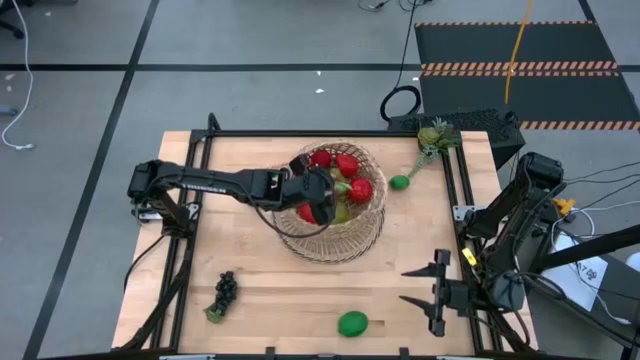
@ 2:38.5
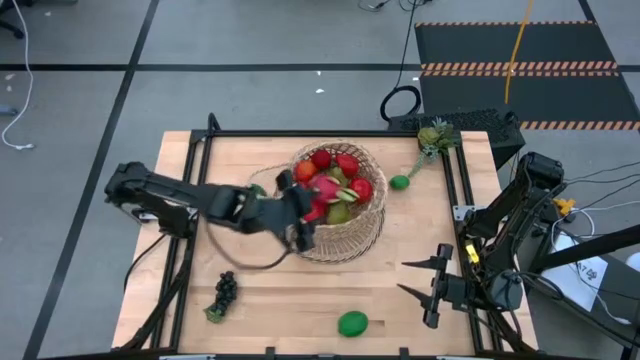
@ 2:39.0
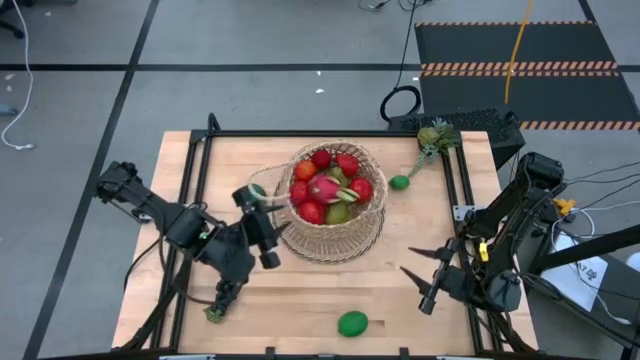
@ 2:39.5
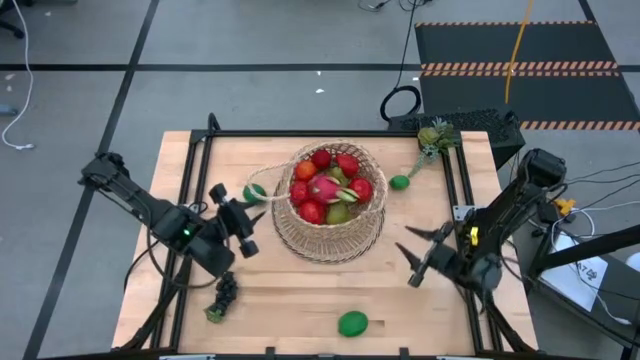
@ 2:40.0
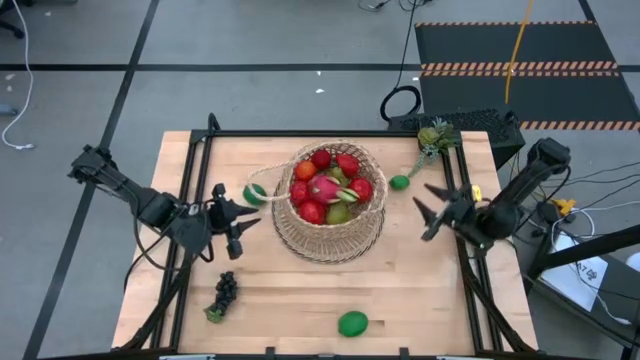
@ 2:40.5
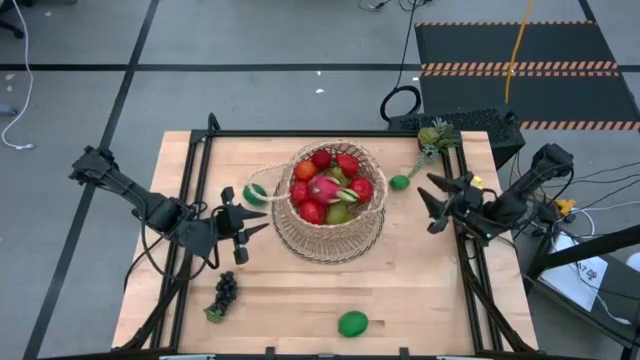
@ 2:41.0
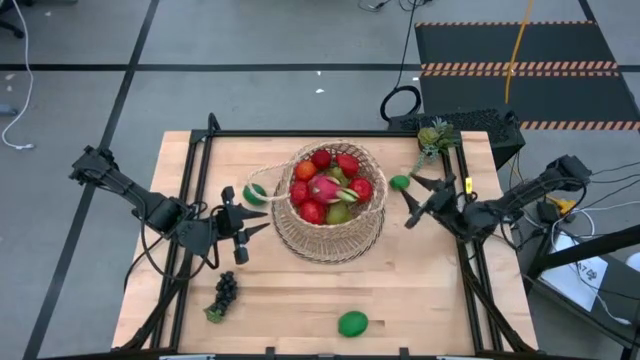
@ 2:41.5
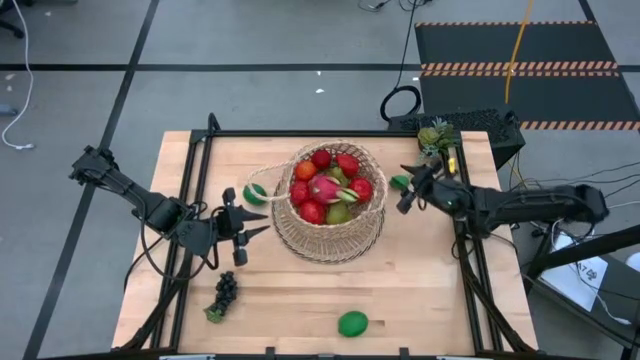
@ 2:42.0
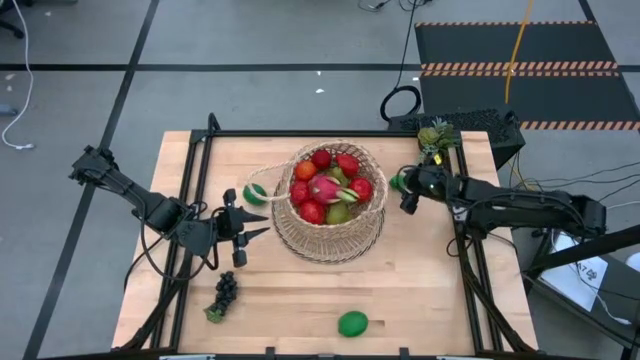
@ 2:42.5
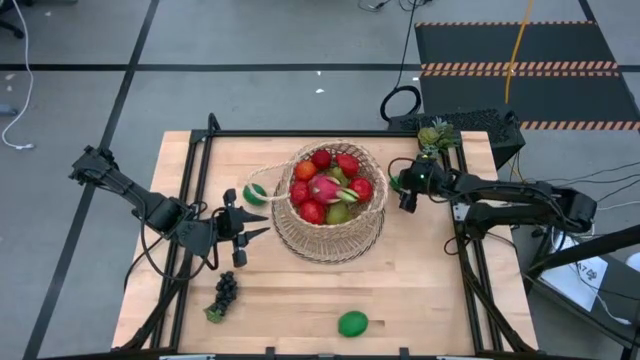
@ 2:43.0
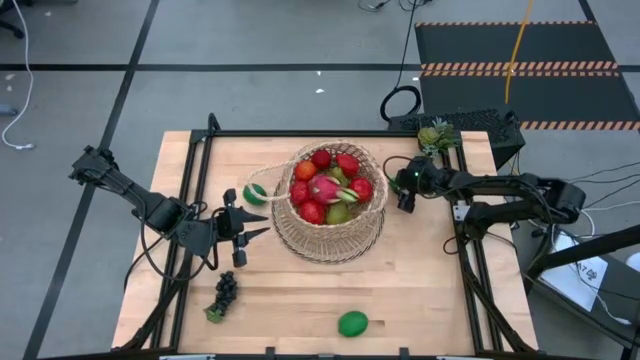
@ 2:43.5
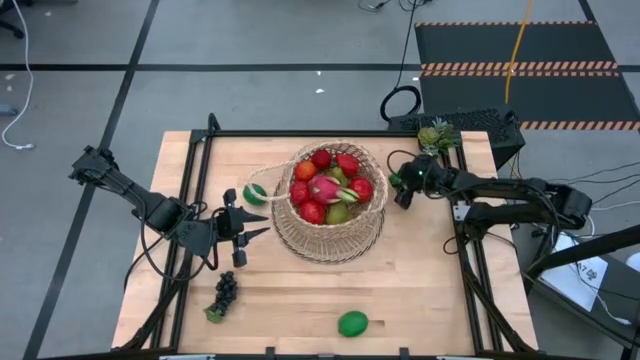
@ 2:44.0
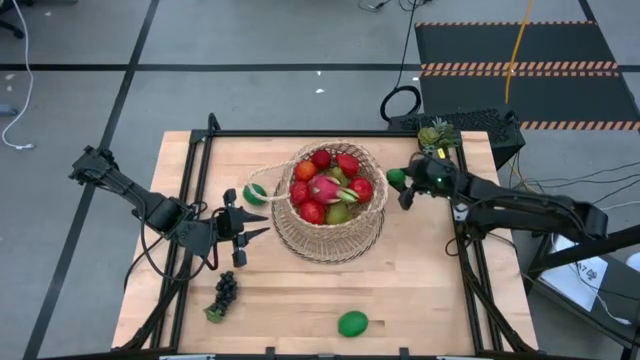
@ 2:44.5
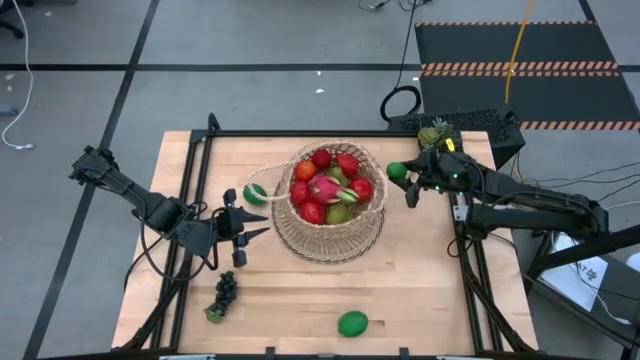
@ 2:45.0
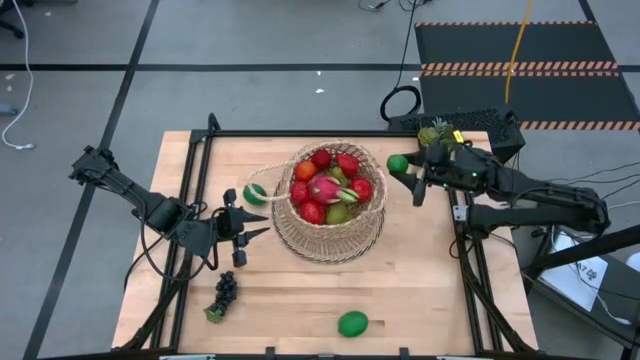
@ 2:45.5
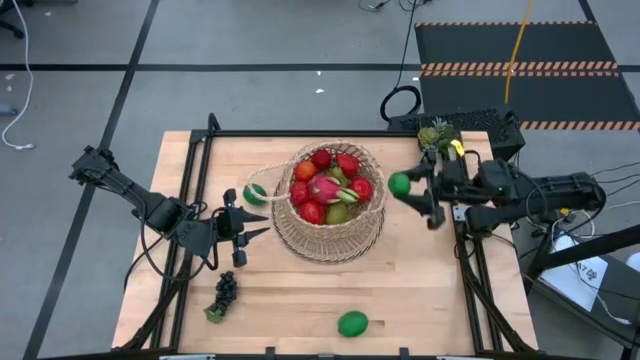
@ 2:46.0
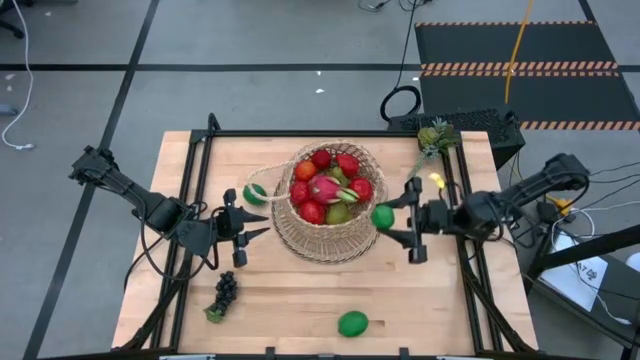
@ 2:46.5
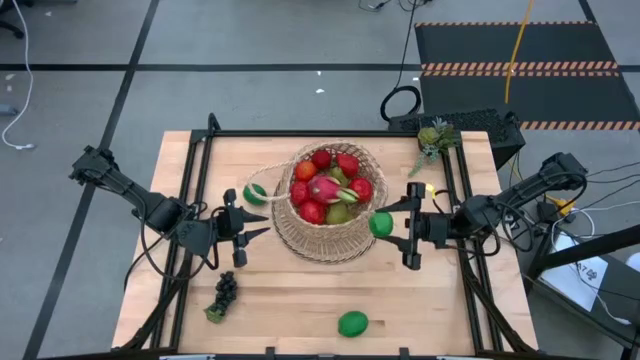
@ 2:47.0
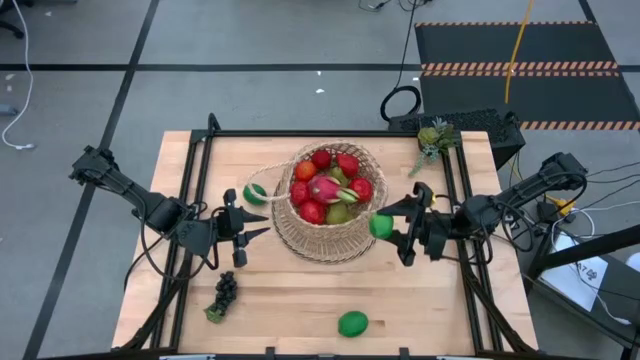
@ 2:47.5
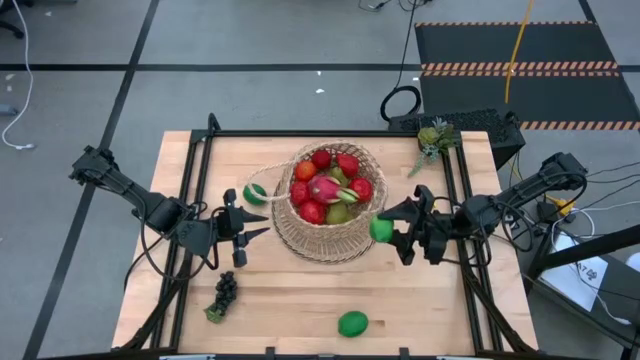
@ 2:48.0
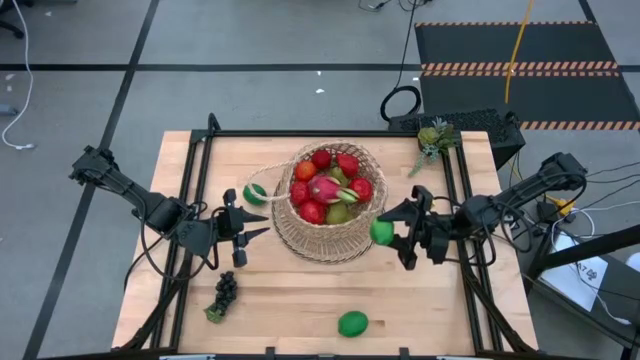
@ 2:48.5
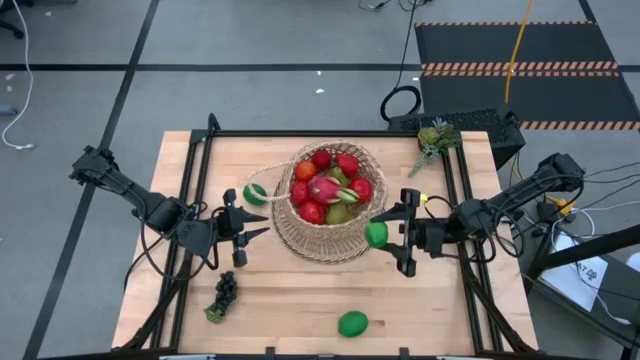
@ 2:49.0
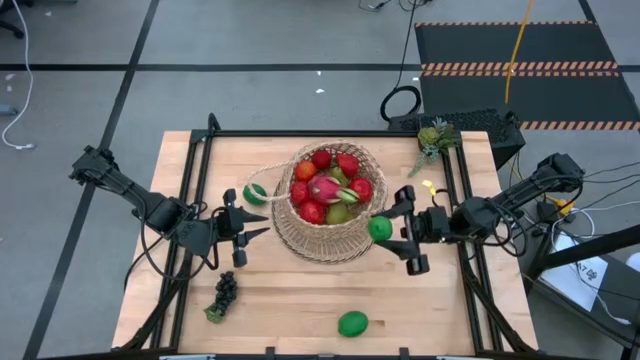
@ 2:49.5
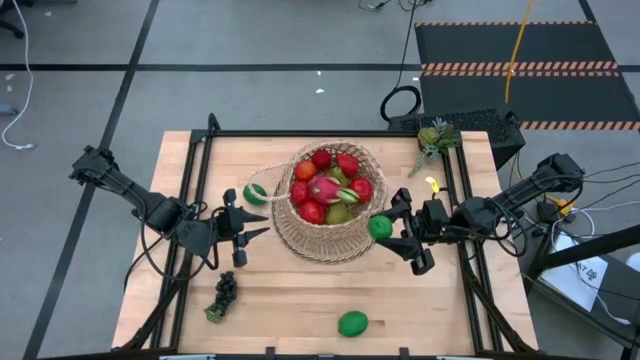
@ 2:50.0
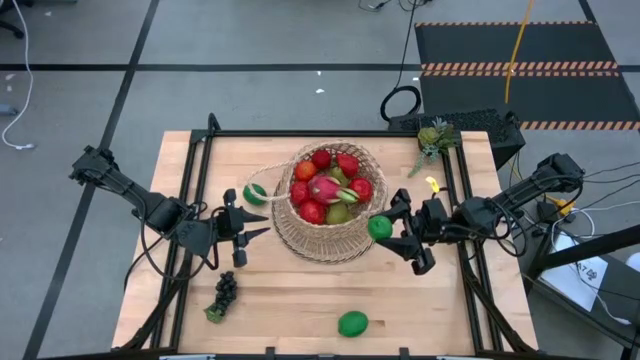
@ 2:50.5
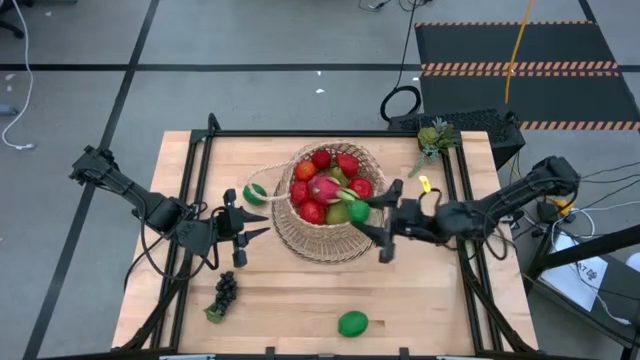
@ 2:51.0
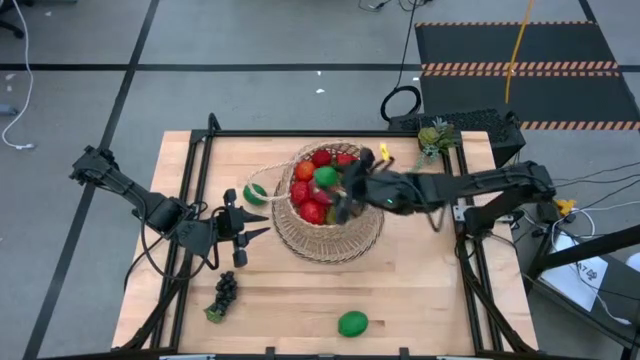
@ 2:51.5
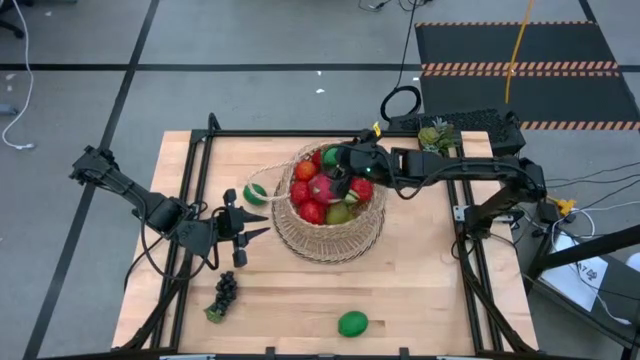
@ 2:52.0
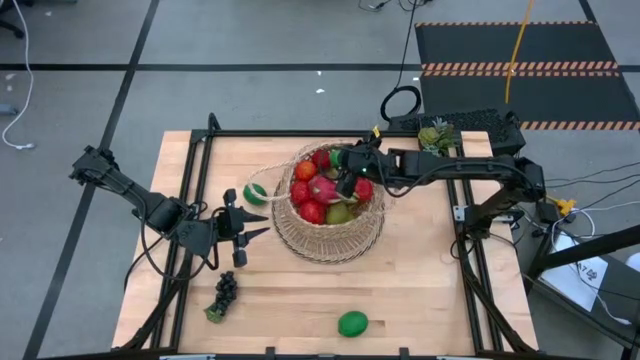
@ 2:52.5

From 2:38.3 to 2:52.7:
Task: Build produce basket
Put the top right green lime into the basket

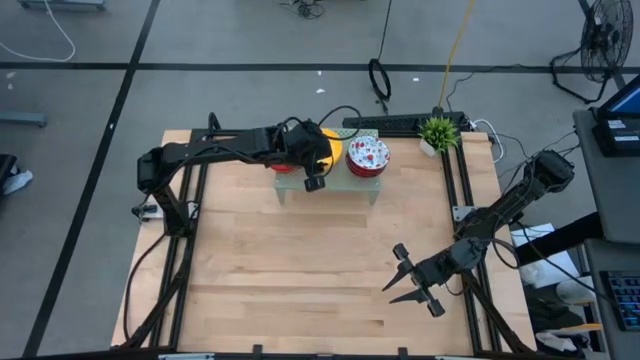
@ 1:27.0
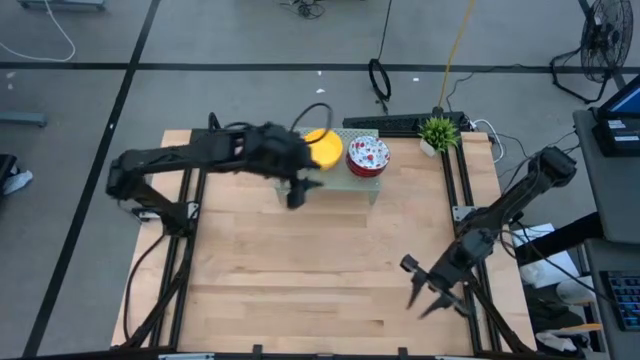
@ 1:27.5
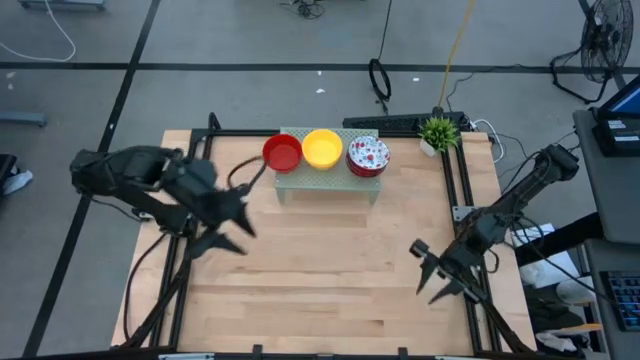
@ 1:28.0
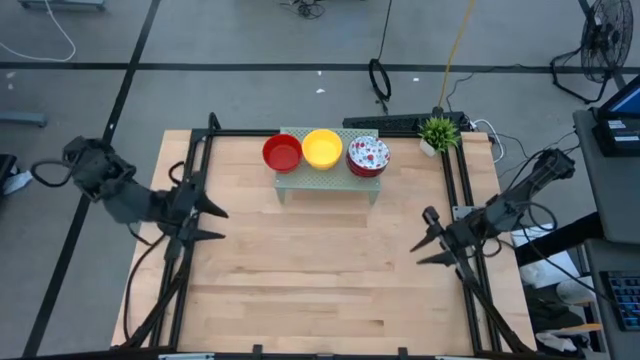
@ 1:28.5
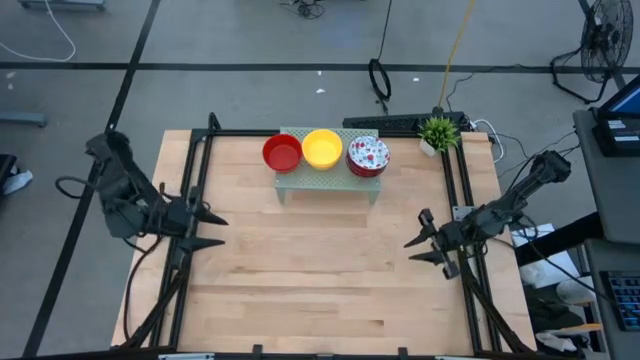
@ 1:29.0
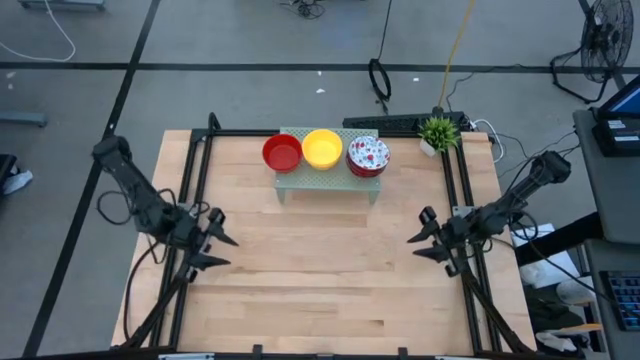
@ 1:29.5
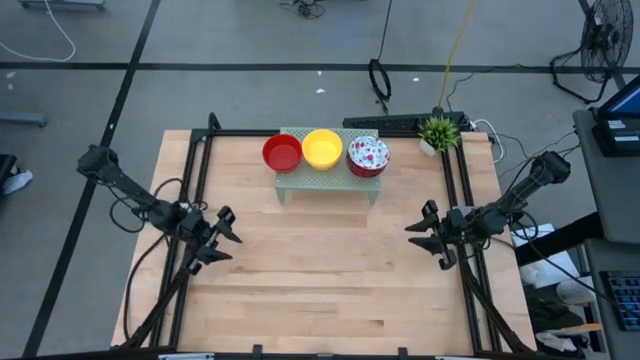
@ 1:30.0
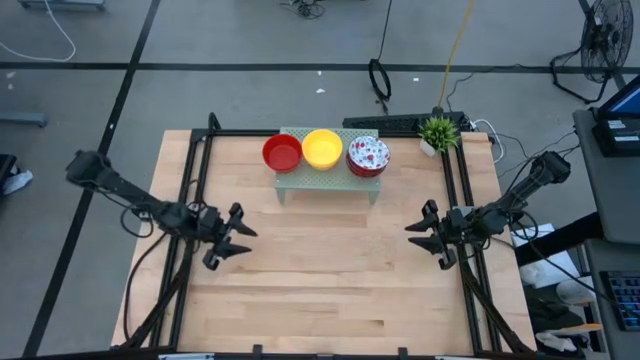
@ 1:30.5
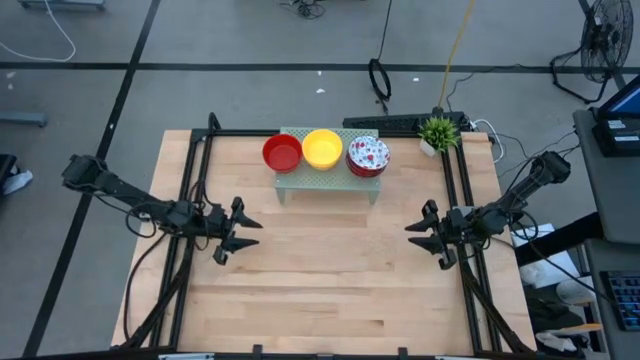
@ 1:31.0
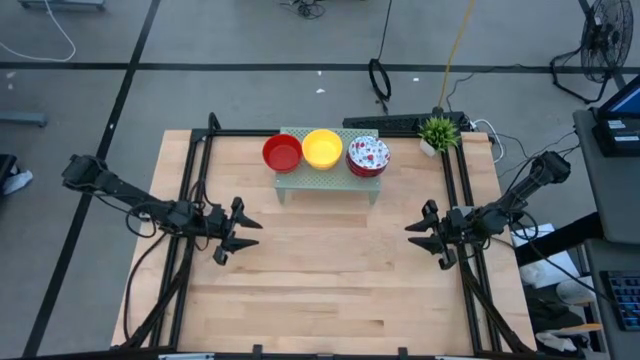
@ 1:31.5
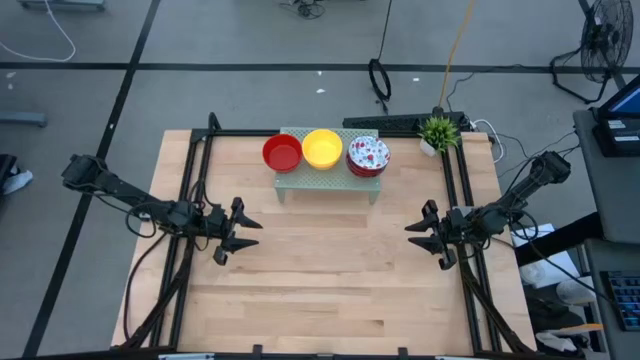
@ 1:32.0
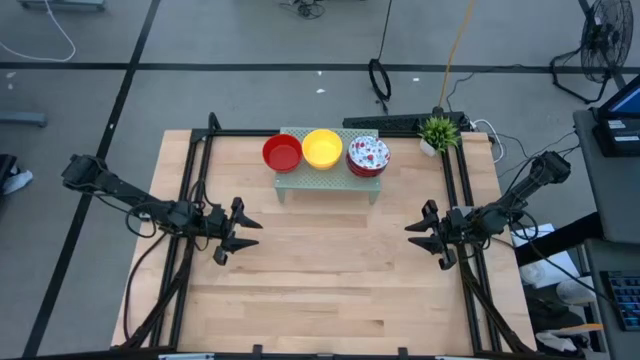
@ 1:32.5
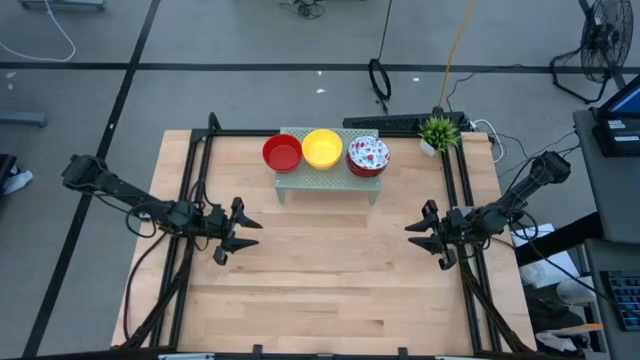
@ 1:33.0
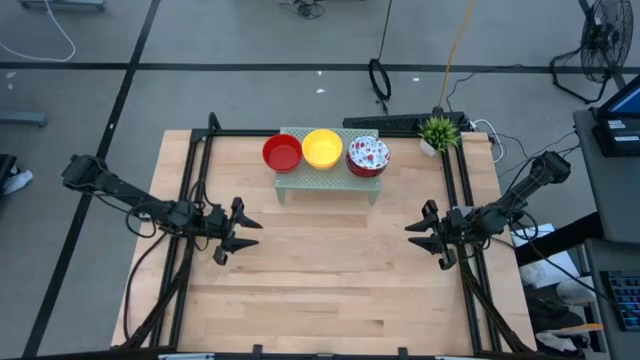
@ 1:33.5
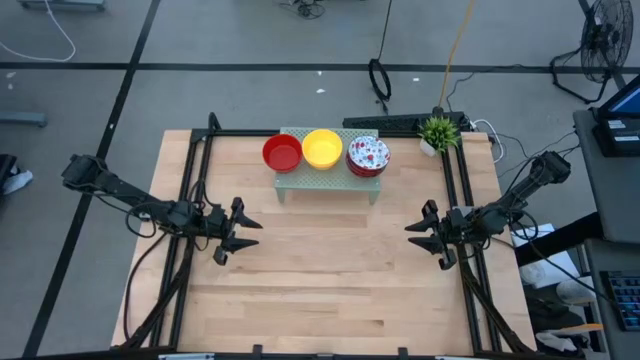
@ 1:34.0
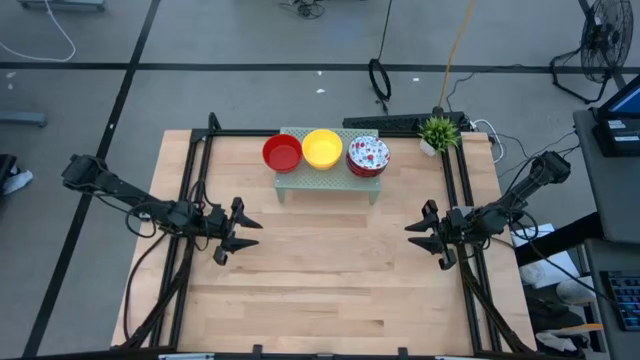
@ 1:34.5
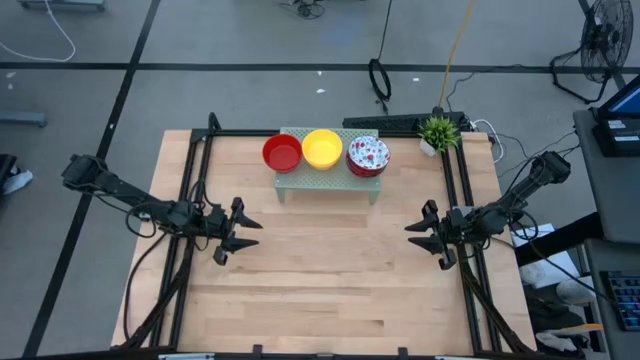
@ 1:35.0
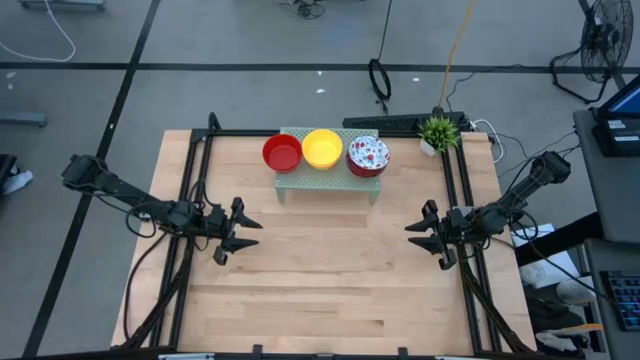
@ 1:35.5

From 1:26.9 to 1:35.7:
Task: Pick & Place Mini bowls
Return to home position
